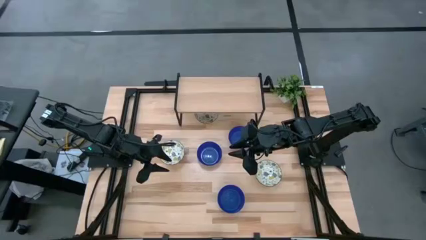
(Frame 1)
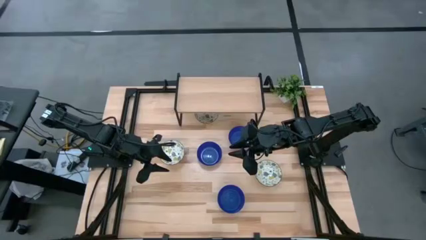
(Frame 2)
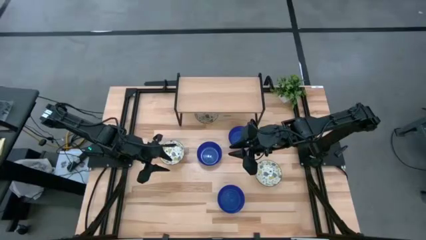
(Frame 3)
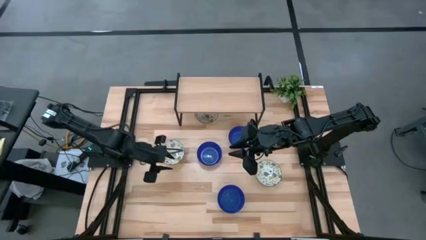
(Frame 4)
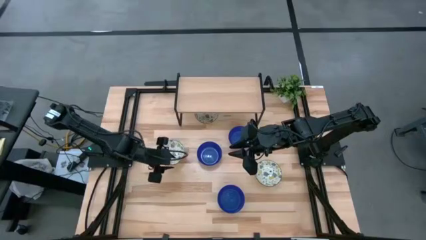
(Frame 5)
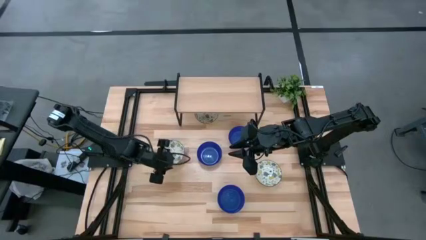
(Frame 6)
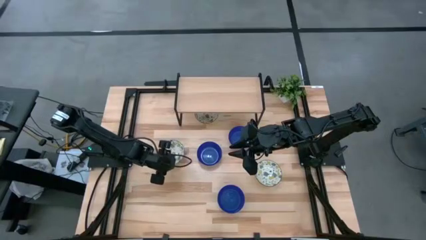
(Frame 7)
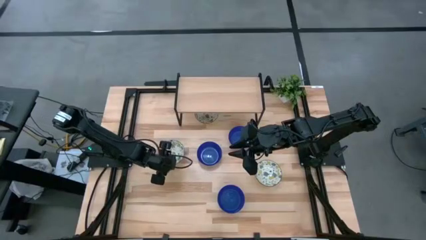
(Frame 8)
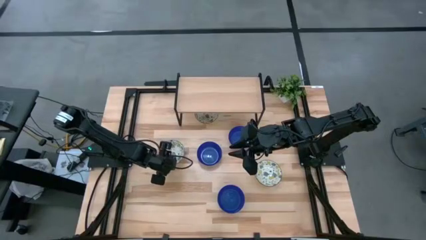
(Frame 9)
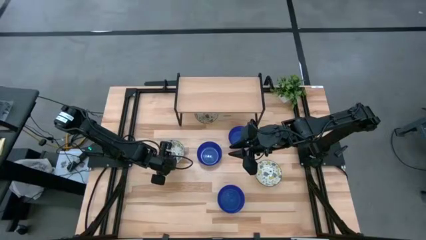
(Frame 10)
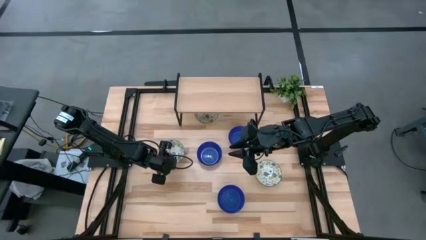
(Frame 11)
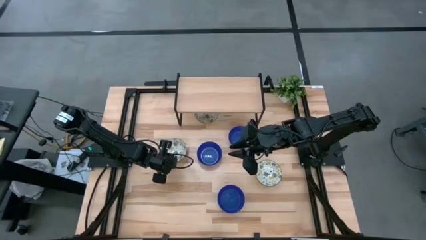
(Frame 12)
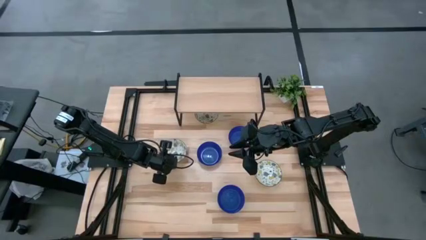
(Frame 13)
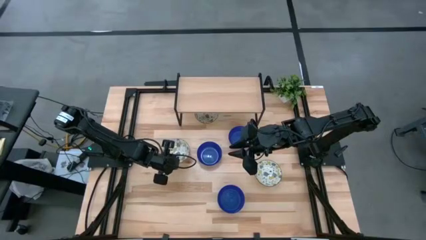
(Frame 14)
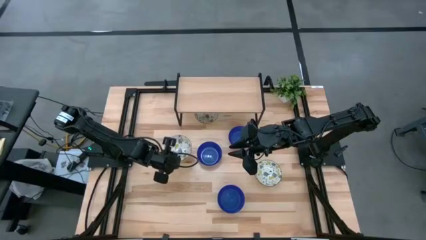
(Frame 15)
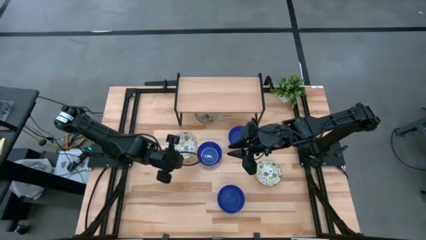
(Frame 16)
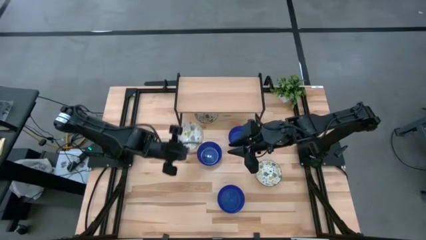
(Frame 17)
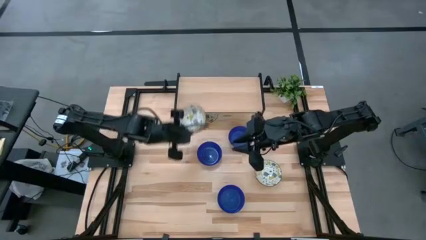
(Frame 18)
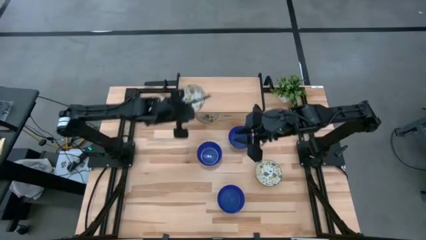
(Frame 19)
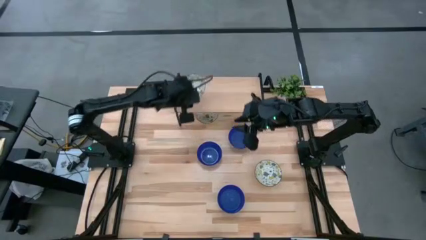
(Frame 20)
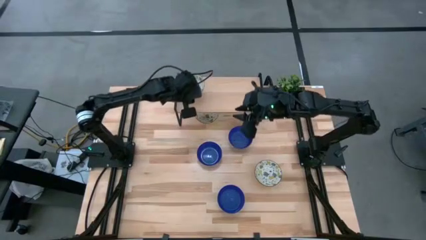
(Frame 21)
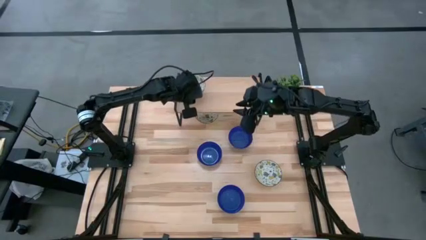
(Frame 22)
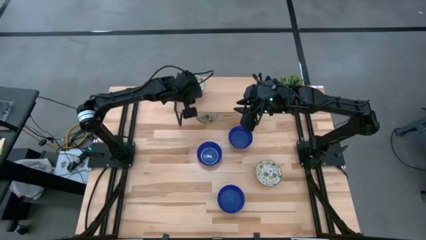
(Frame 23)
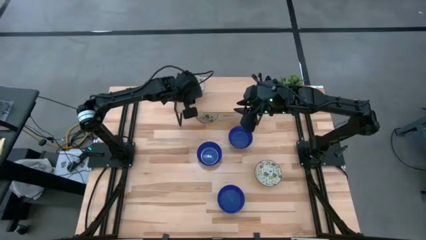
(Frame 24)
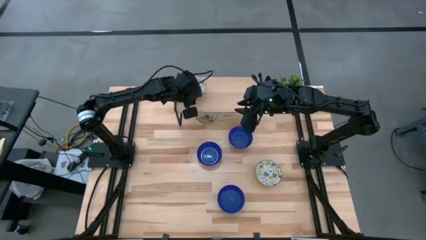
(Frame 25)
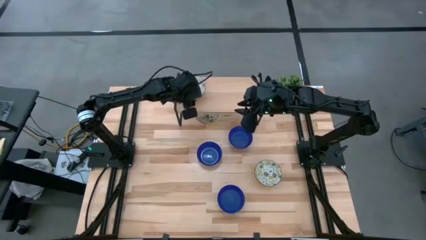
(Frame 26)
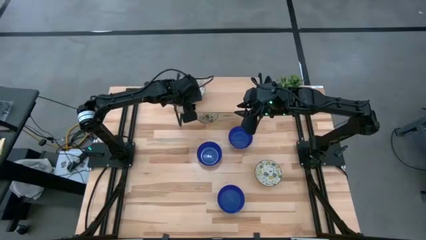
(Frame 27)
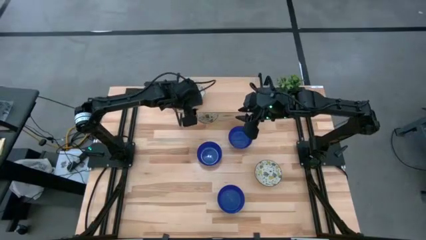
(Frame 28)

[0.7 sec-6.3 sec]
Task: Pick & Place Mini bowls
Put the bottom left white bowl on the shelf

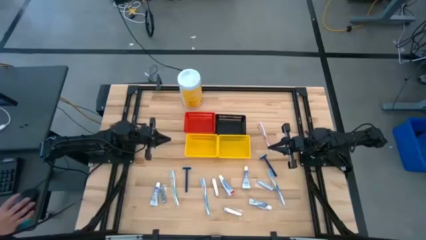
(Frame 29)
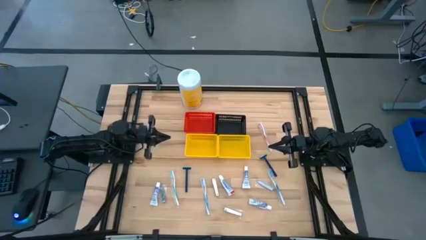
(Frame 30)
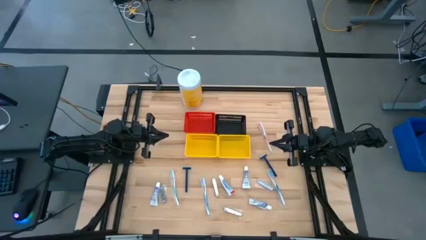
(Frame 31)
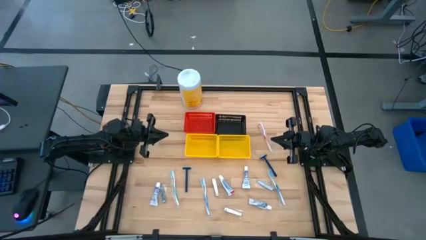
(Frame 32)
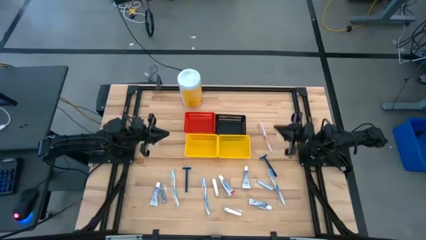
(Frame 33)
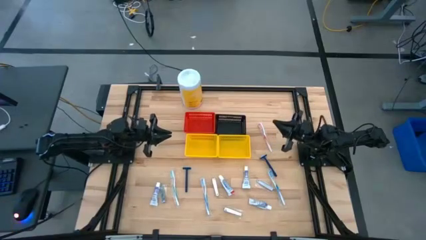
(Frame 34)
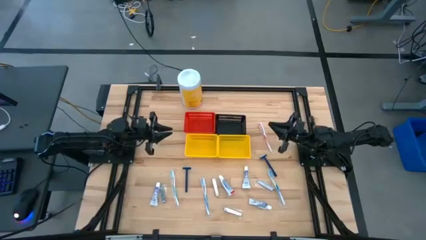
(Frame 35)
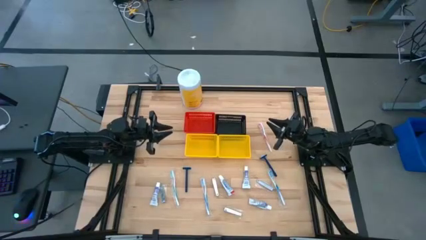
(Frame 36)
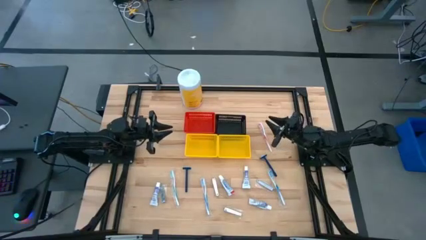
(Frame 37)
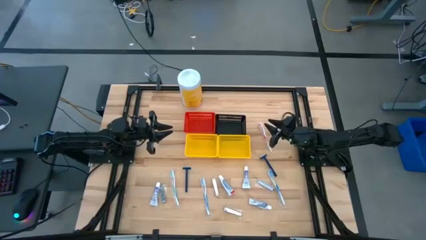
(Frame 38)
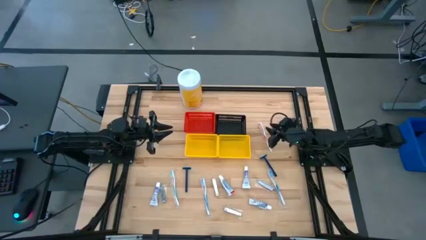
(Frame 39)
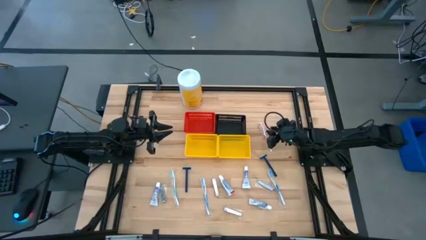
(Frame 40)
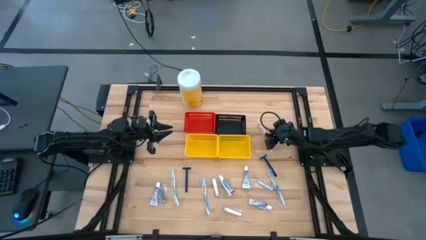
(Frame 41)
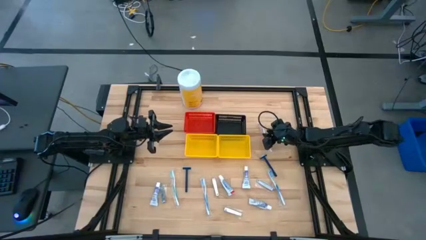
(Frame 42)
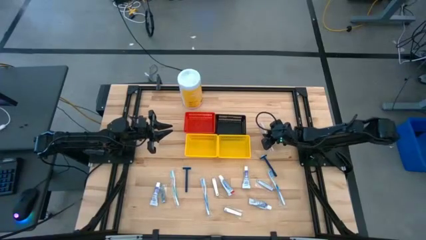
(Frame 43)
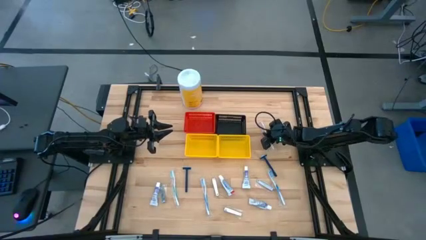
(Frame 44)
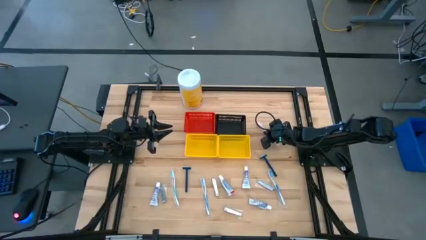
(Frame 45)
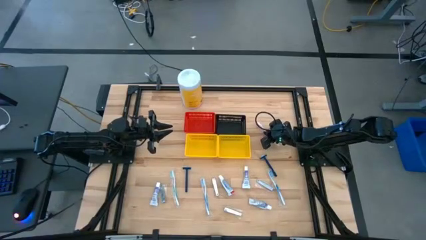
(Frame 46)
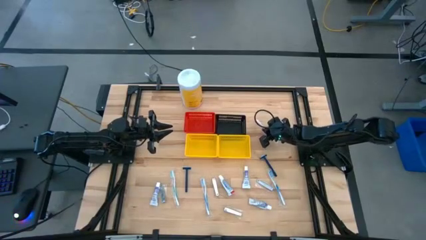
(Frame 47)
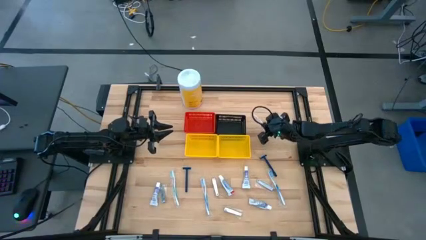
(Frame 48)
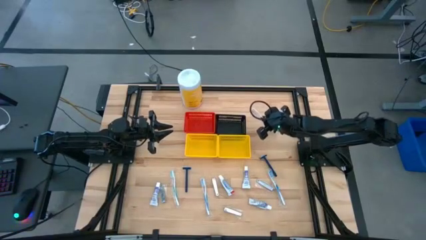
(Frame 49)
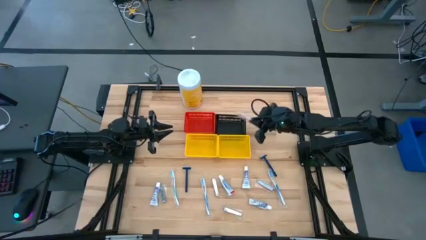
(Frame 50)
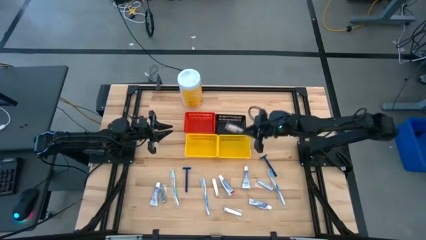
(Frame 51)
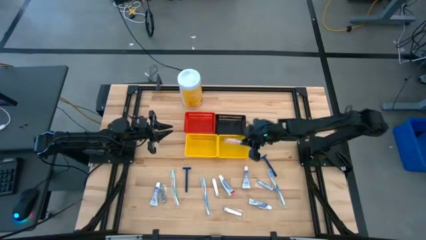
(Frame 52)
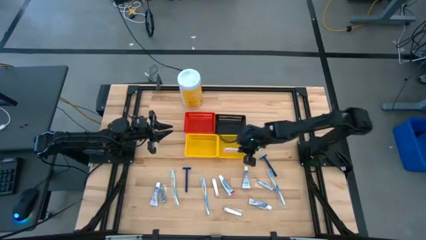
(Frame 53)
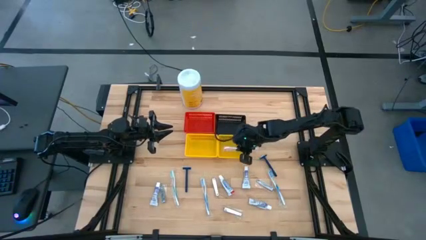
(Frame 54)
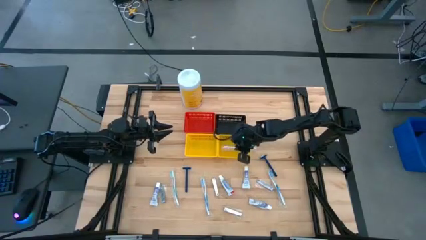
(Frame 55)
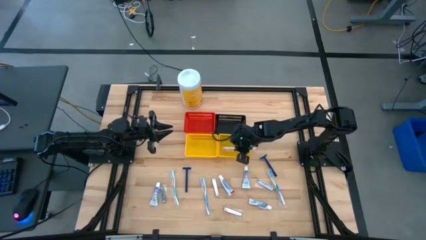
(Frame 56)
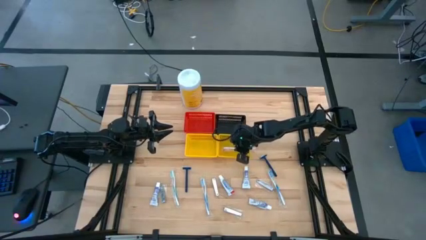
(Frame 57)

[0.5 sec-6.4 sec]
Task: Pick & Place Travel size toiletries
Put the red toothbrush into the right yellow bin

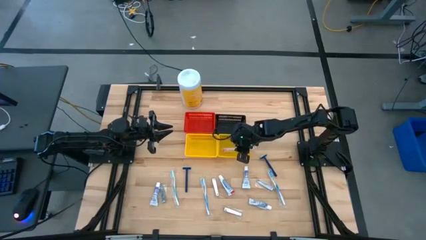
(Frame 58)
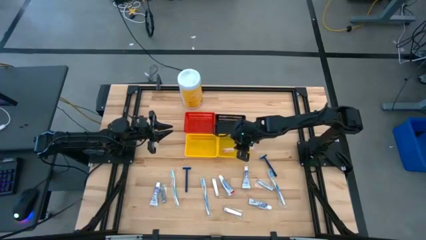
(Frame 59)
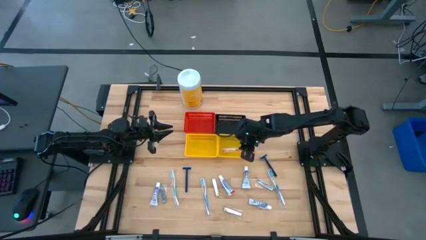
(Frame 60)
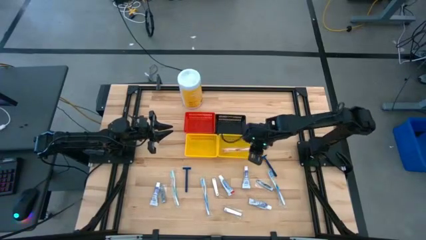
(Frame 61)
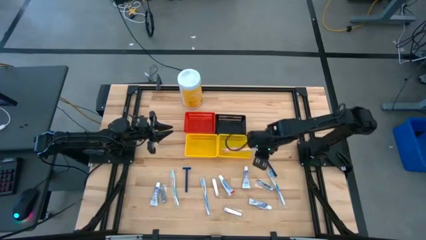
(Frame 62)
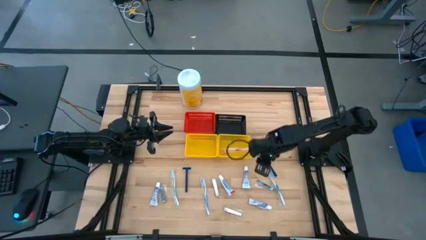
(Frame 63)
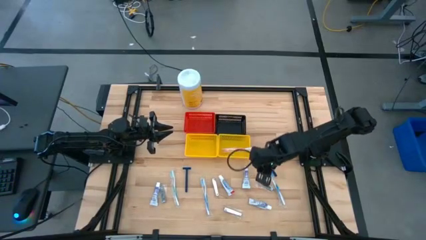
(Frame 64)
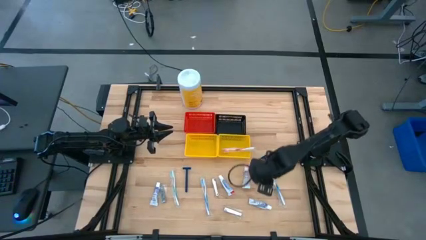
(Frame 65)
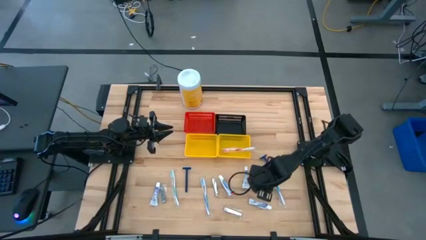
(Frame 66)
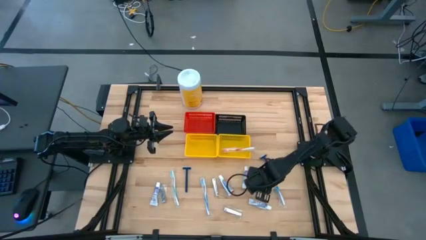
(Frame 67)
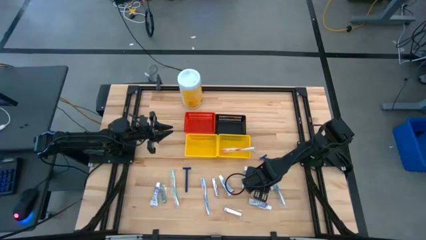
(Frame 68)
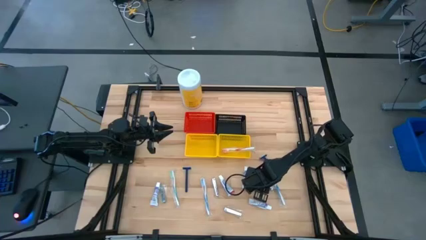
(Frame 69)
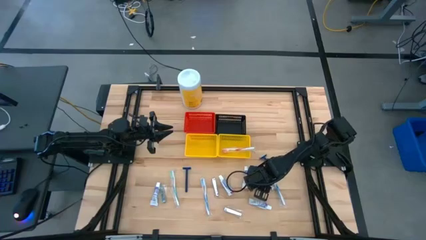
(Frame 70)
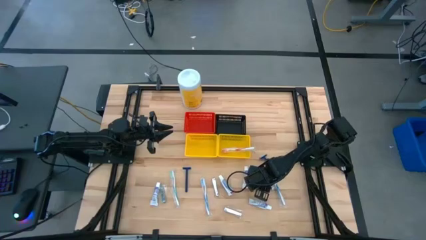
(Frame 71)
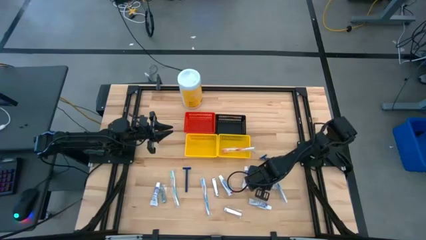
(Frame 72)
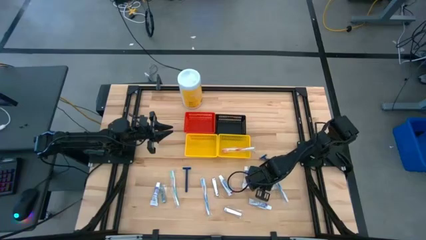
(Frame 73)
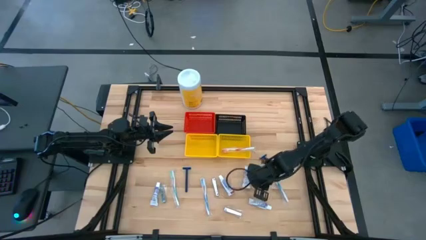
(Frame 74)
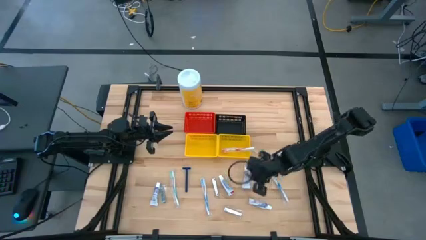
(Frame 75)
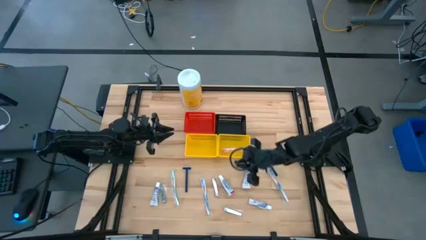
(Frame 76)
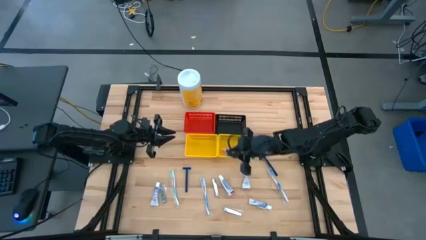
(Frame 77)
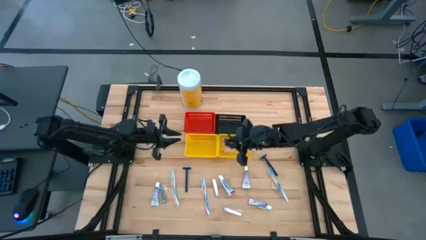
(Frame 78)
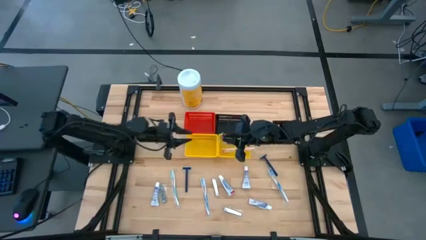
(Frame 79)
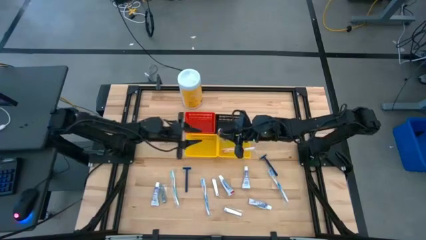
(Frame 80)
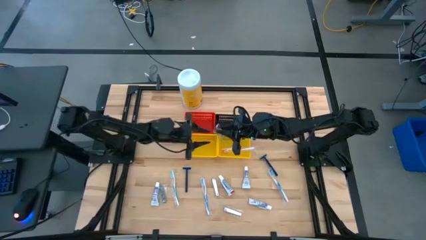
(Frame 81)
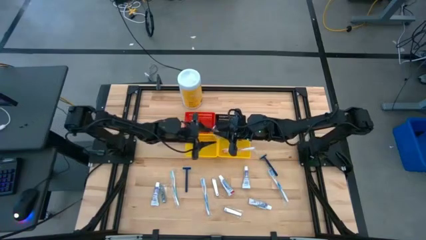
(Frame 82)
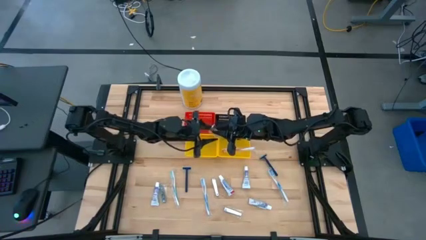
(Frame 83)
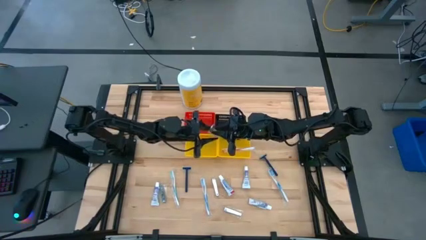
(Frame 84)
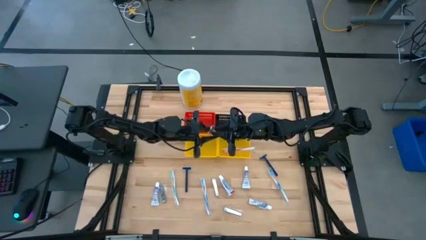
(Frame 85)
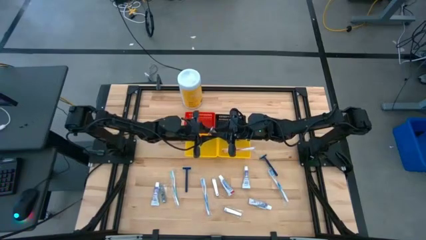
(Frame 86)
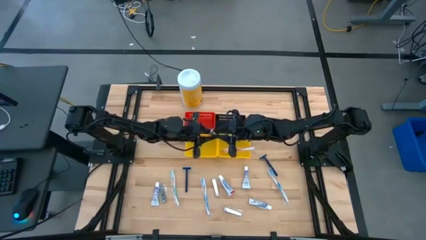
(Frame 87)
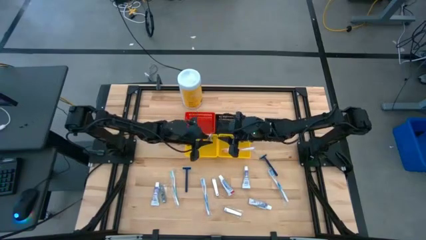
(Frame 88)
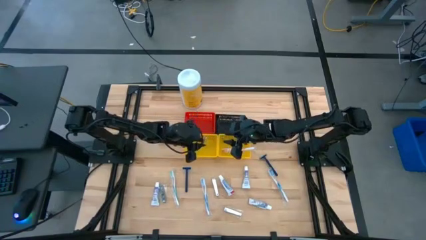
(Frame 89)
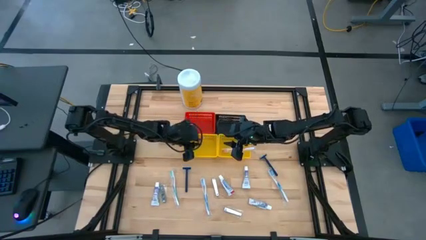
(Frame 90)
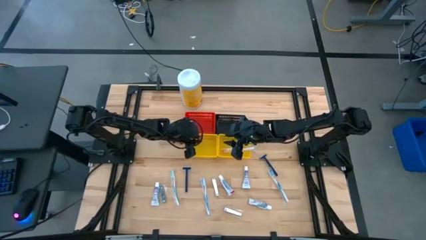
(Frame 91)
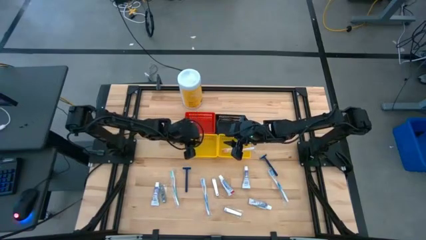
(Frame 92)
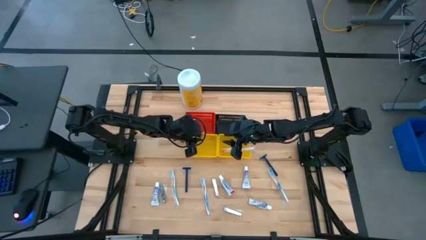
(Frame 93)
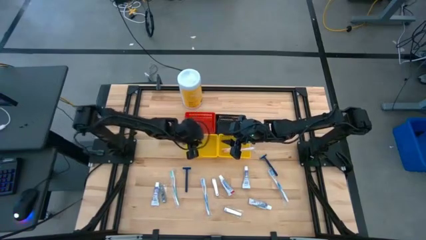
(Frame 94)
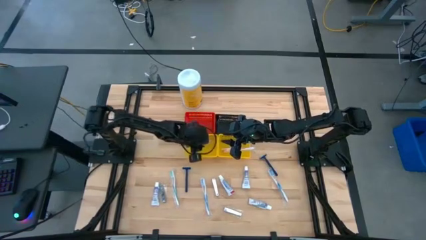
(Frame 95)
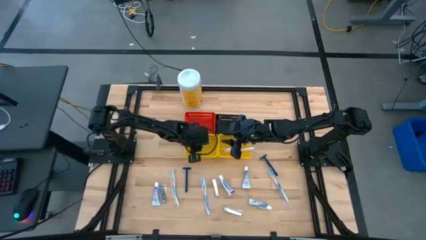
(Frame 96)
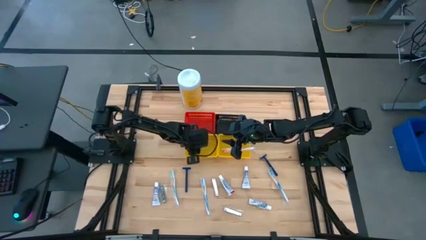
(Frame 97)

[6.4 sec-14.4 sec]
Put the silver nail cutter into the left yellow bin
